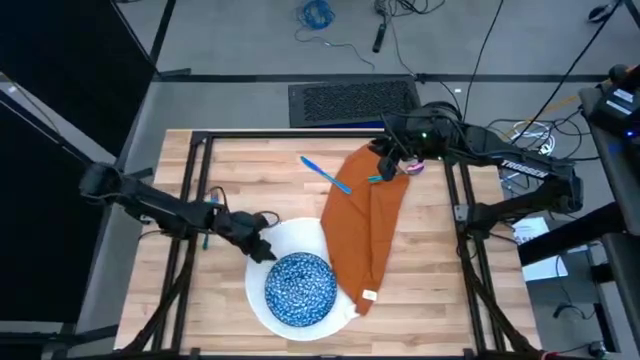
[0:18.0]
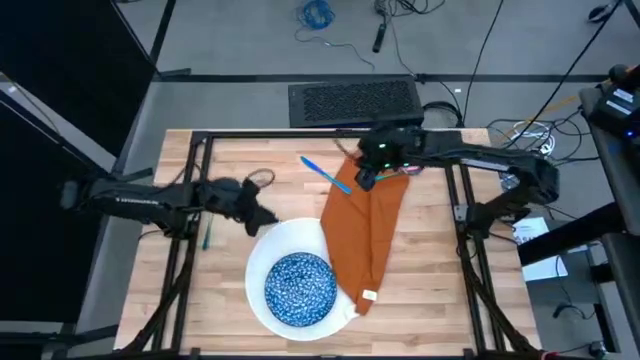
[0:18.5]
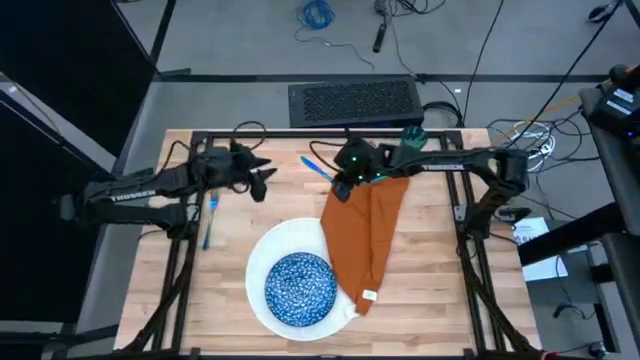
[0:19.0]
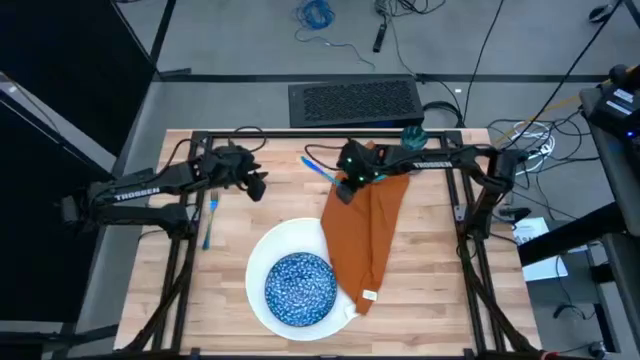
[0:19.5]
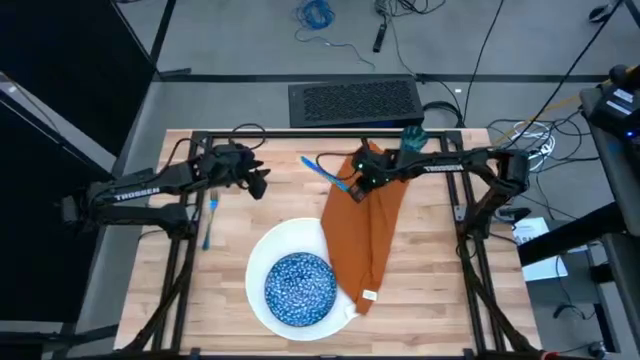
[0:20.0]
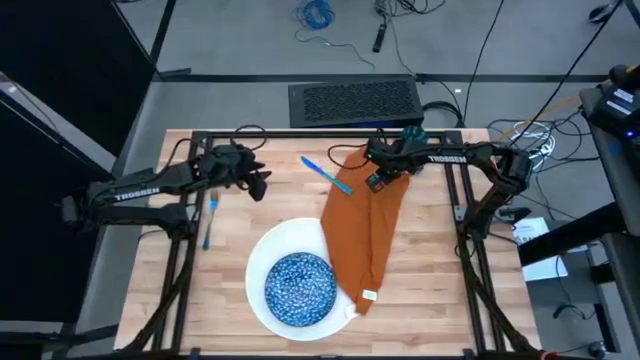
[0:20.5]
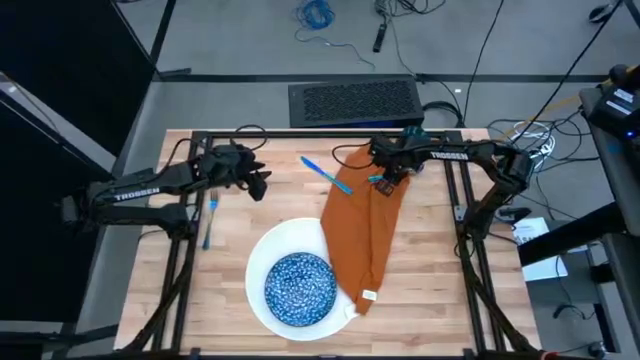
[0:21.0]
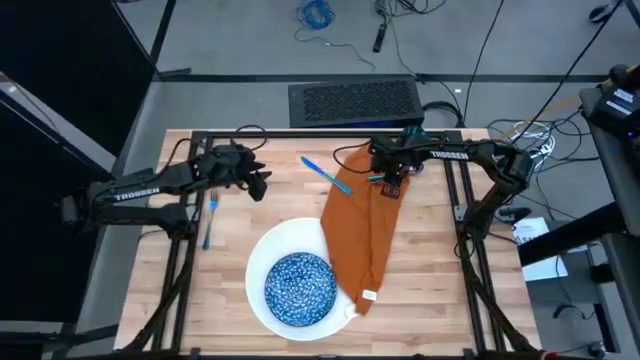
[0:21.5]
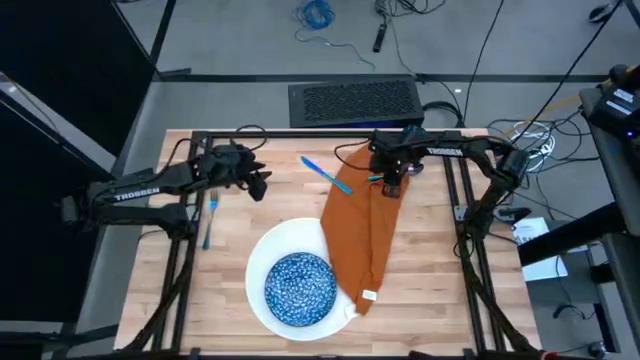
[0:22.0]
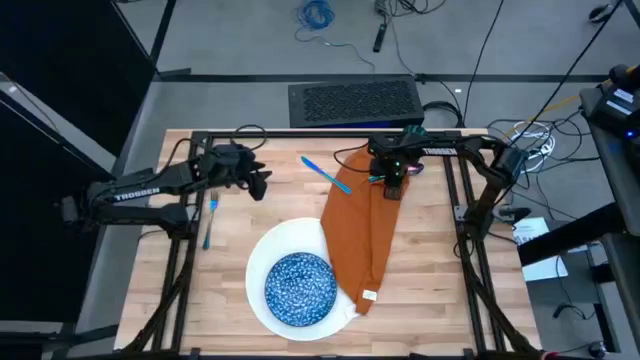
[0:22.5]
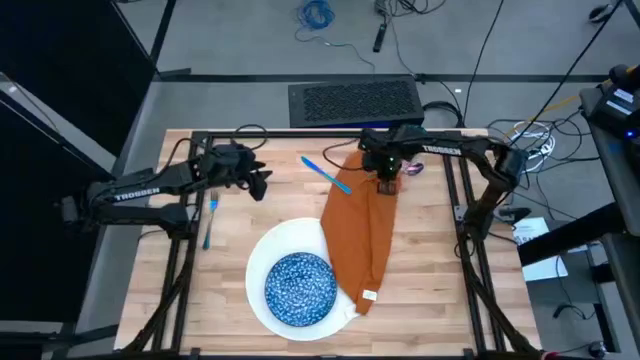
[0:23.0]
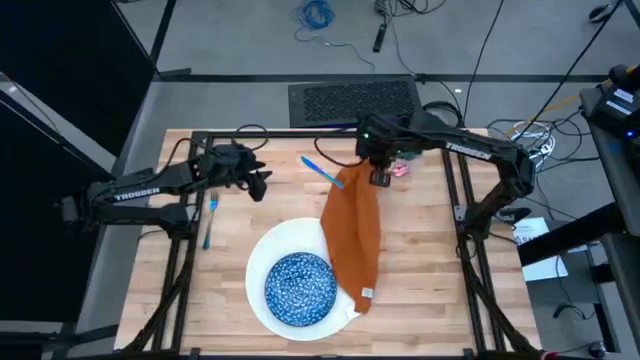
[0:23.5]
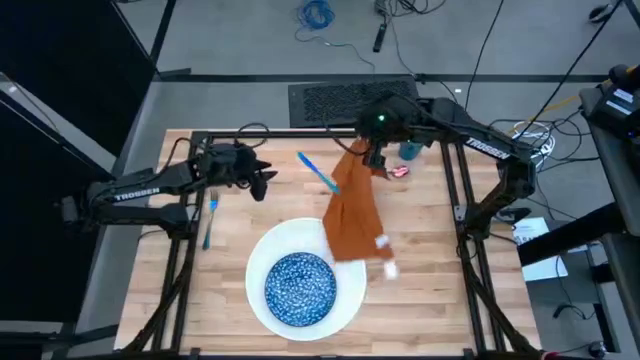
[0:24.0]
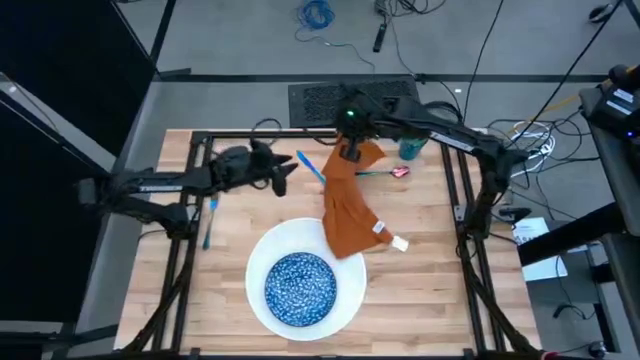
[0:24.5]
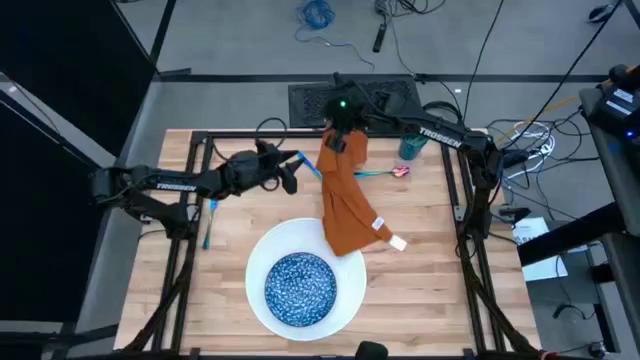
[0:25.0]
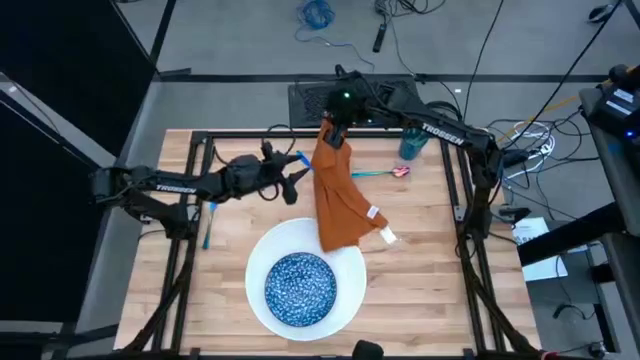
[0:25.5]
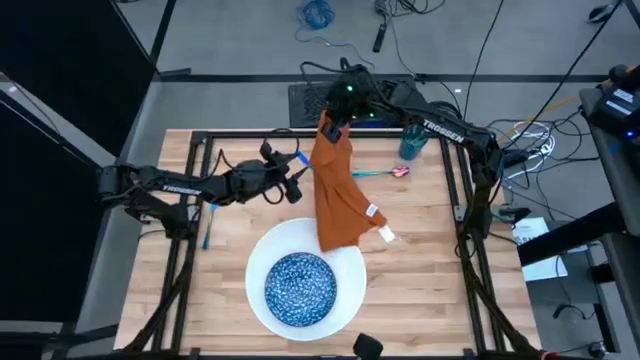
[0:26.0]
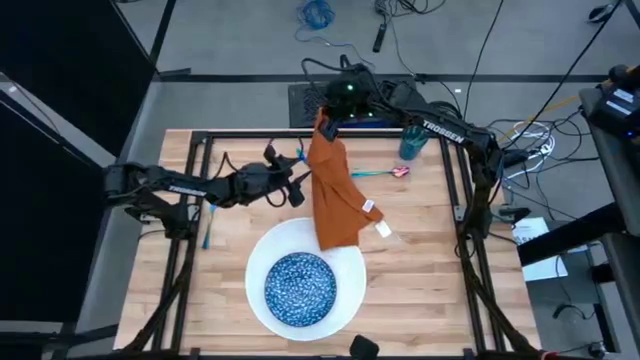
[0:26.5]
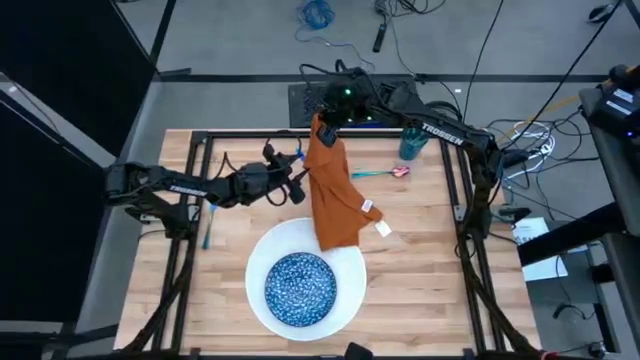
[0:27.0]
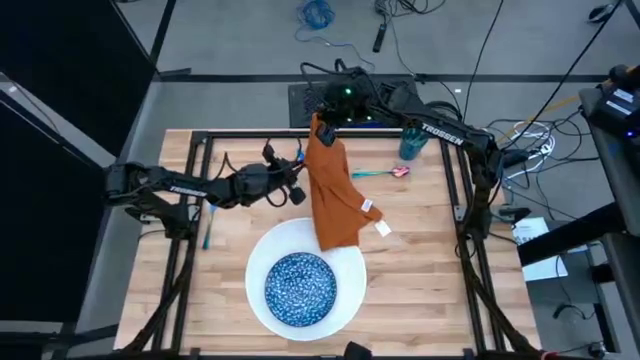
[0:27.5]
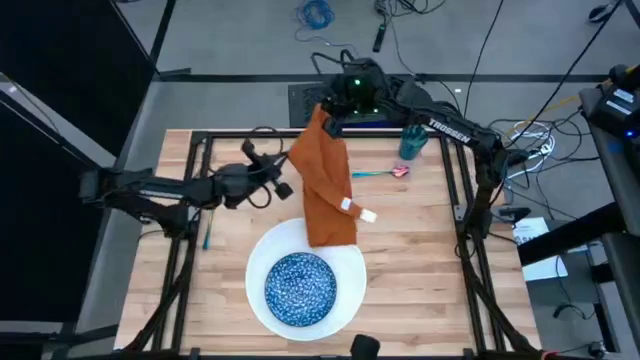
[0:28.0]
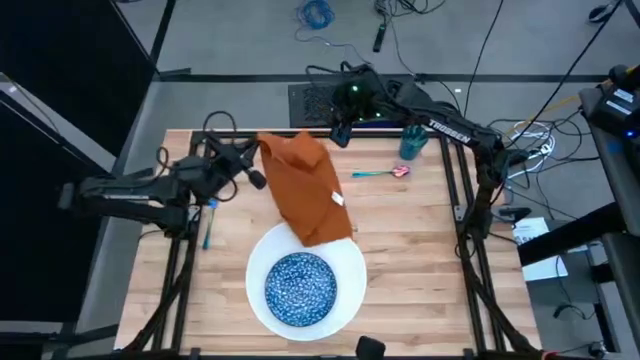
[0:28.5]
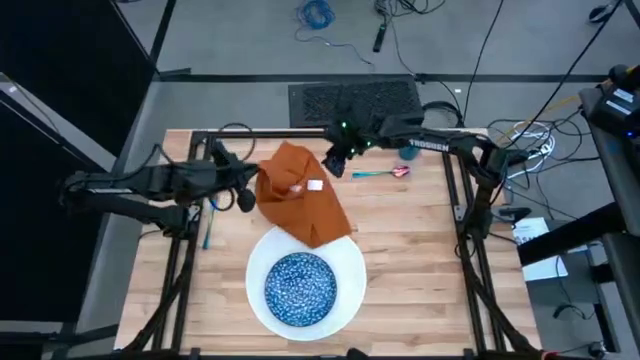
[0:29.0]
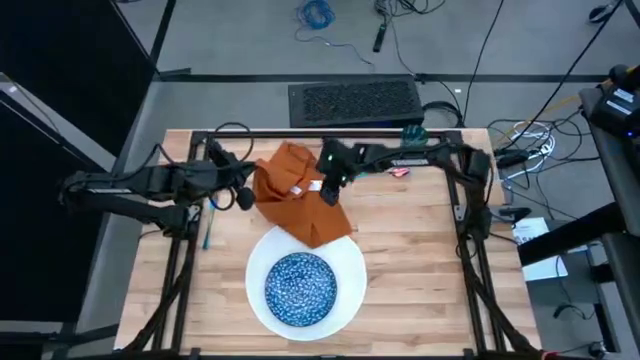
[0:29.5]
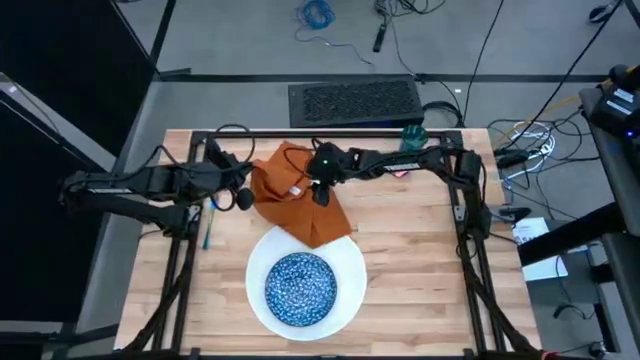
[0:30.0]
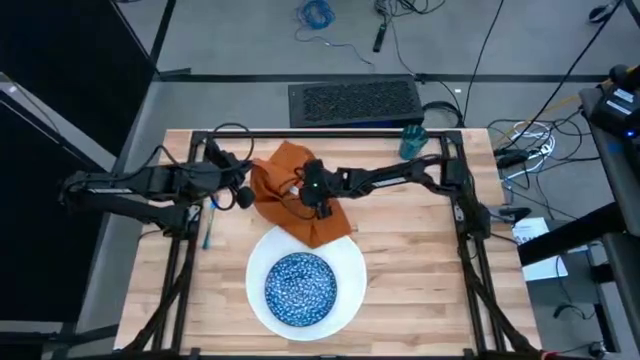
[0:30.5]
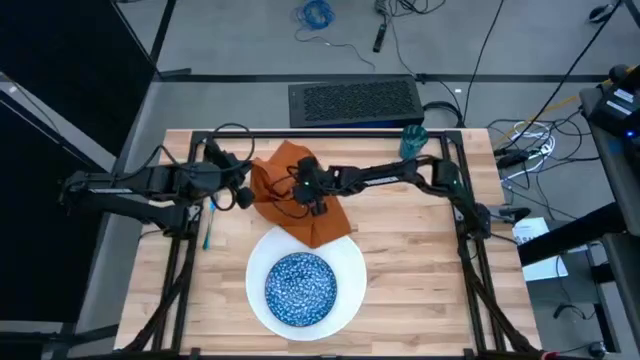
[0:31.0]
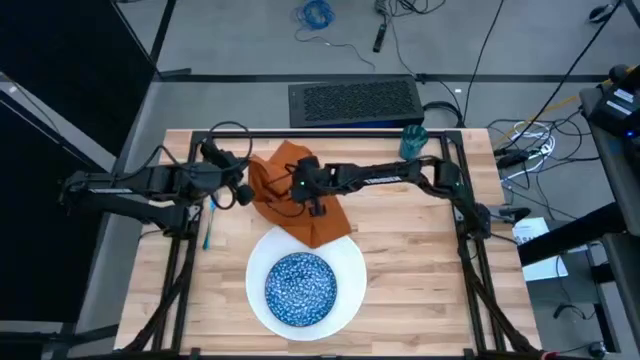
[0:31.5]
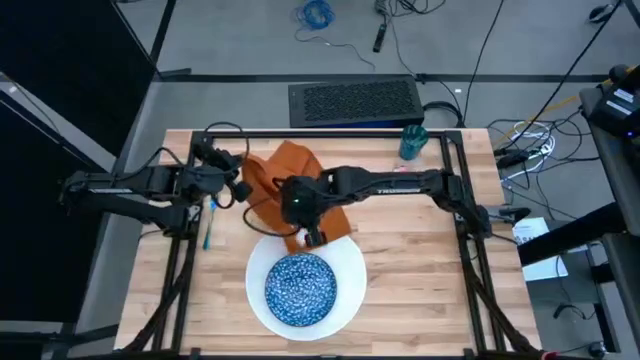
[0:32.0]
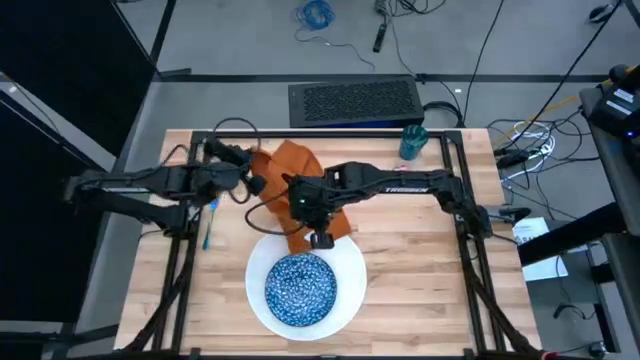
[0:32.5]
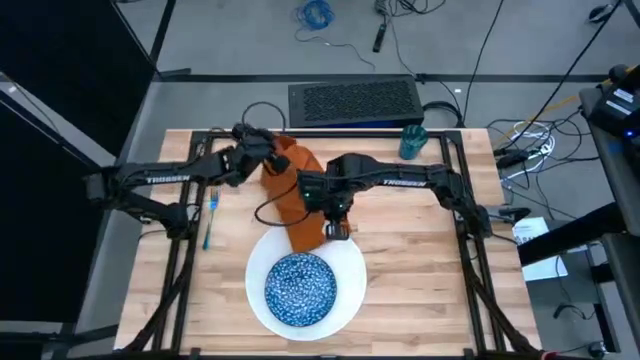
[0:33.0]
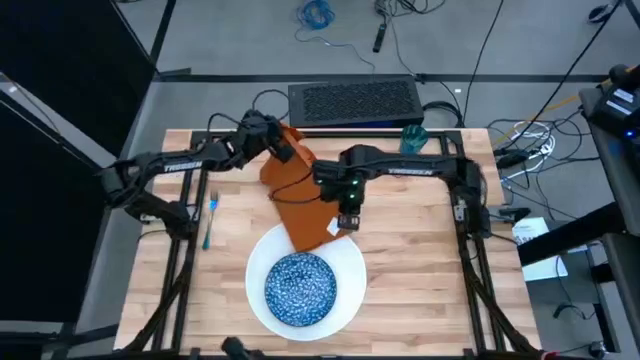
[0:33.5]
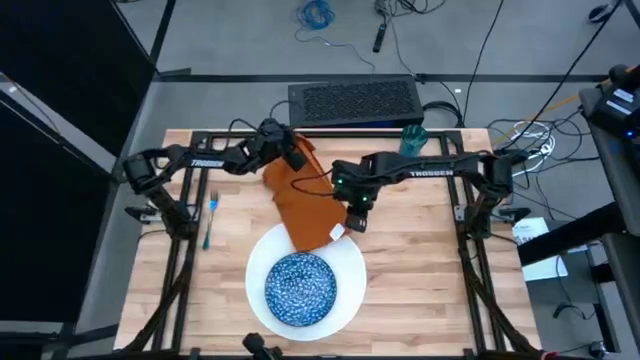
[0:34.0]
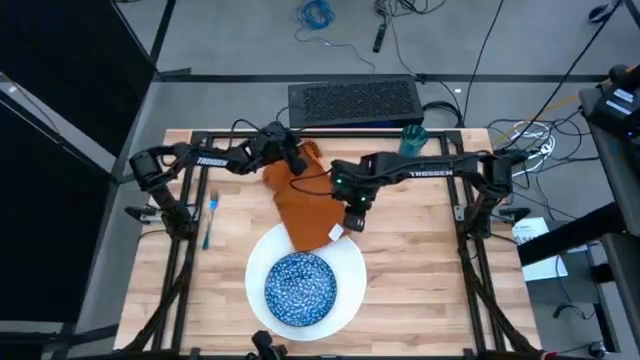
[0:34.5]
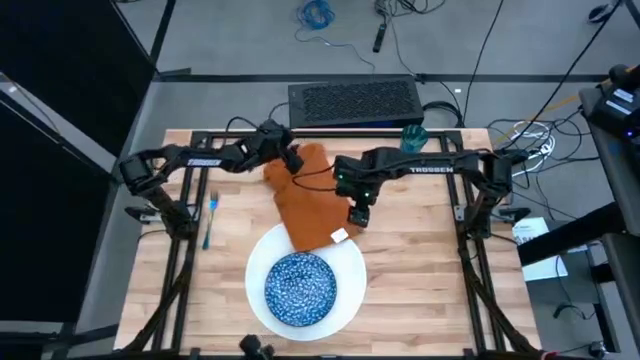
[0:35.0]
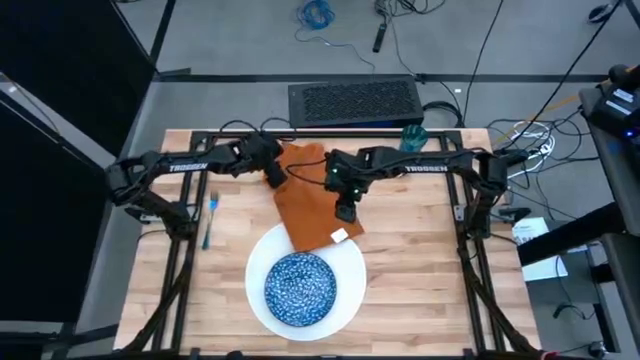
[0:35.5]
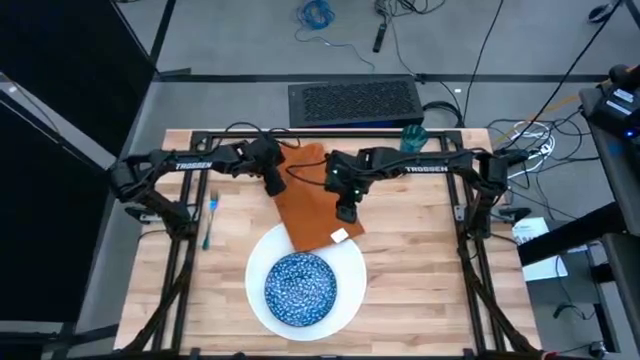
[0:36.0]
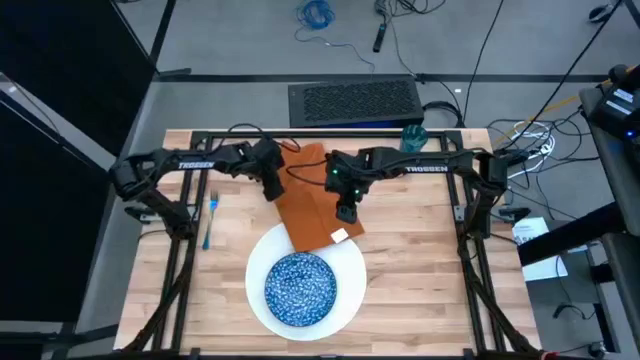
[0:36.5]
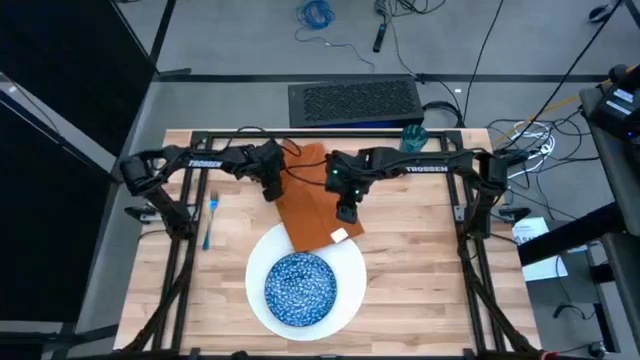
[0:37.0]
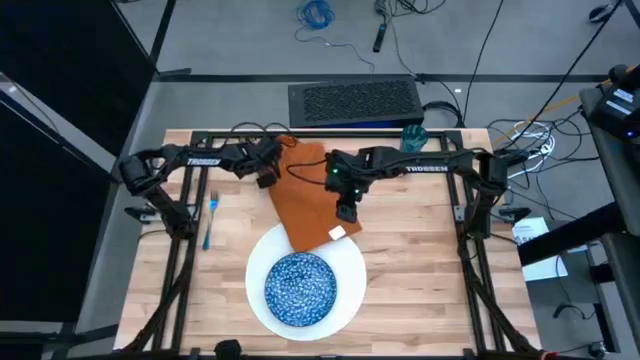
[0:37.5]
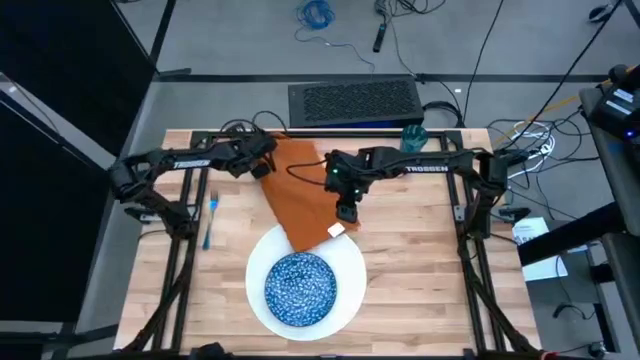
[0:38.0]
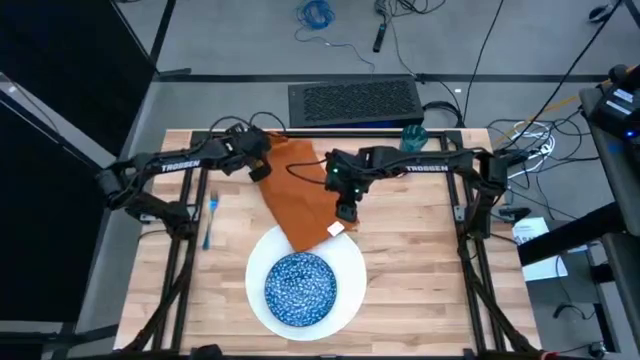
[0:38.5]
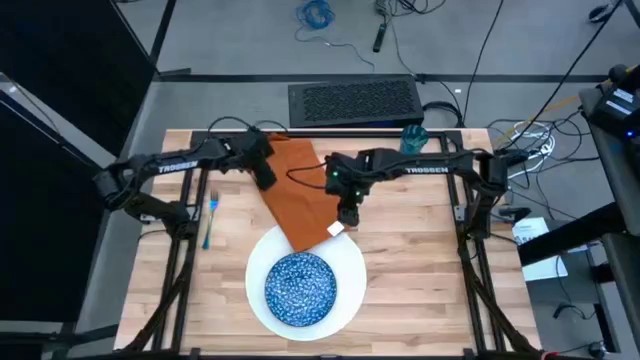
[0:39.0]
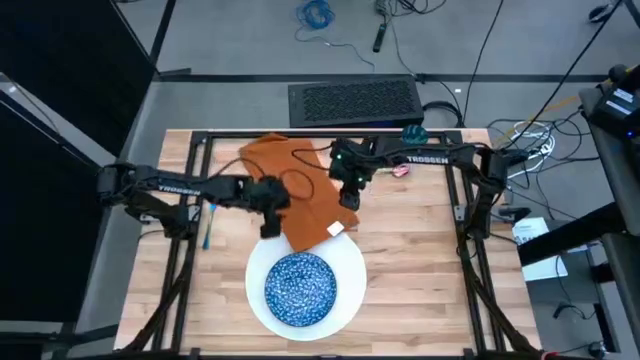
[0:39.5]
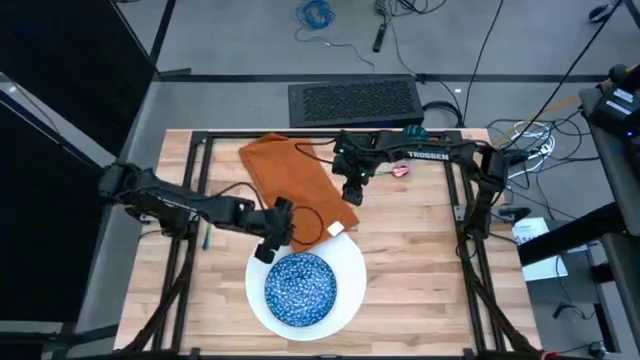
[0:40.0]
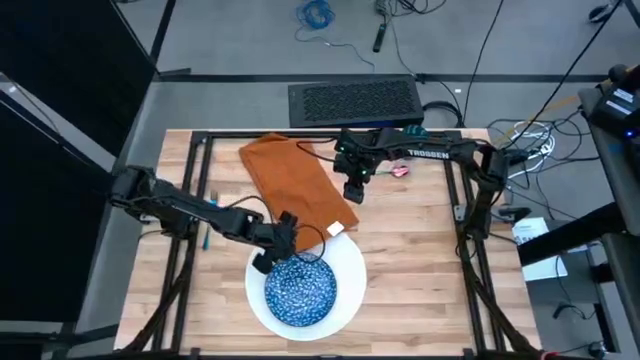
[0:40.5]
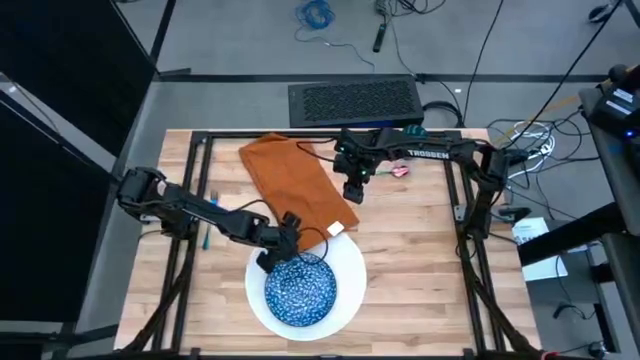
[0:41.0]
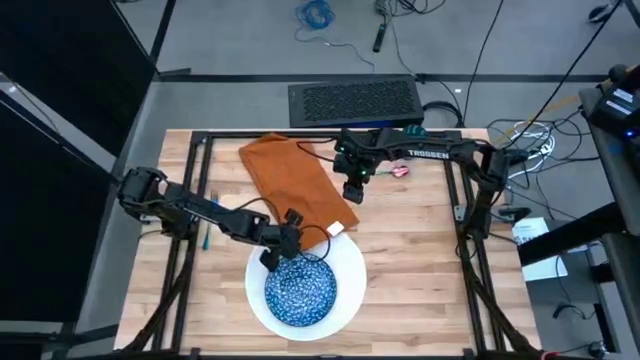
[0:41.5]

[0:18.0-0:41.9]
Task: Set table place
Fold the orange table napkin
